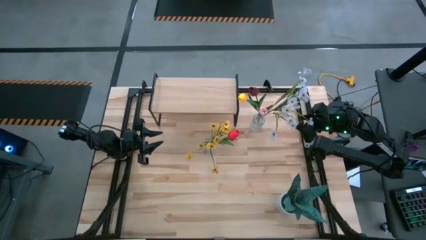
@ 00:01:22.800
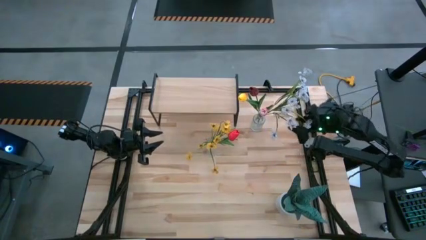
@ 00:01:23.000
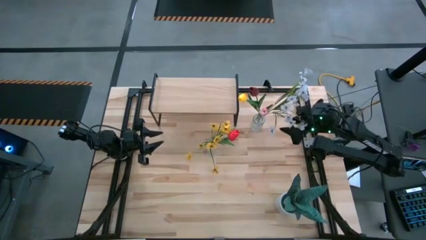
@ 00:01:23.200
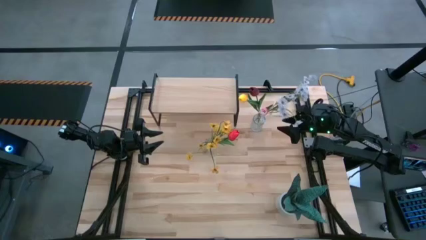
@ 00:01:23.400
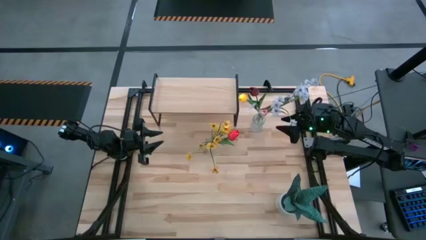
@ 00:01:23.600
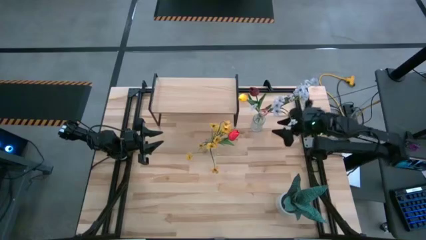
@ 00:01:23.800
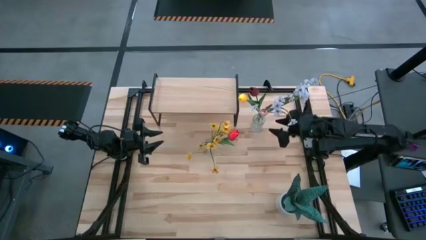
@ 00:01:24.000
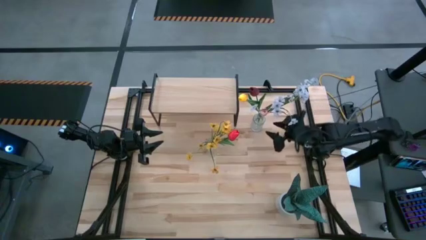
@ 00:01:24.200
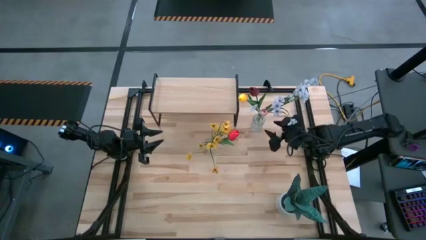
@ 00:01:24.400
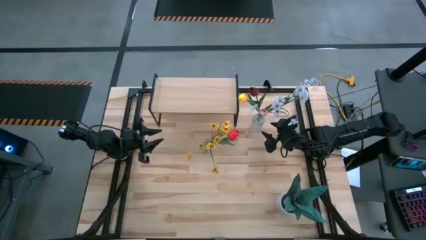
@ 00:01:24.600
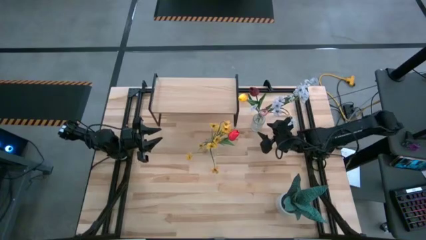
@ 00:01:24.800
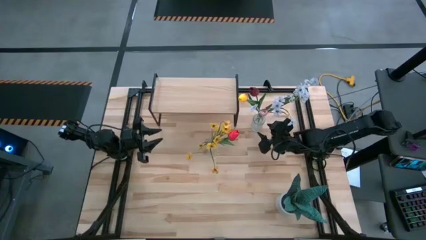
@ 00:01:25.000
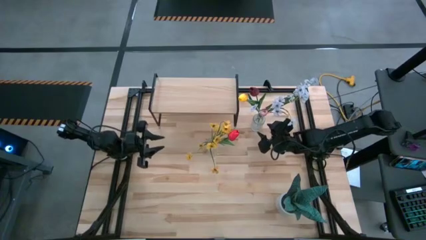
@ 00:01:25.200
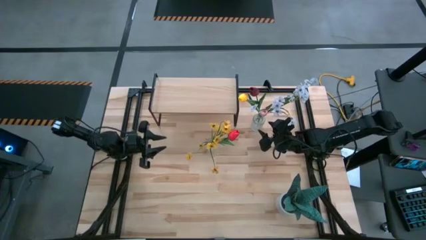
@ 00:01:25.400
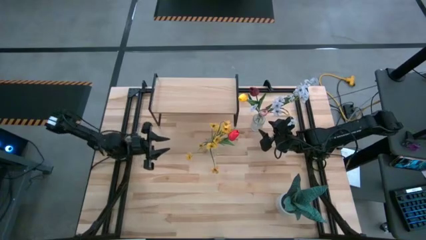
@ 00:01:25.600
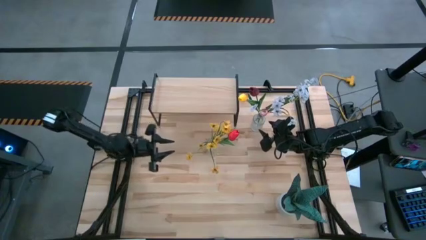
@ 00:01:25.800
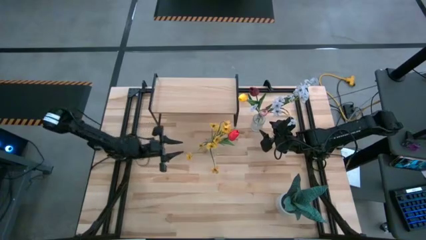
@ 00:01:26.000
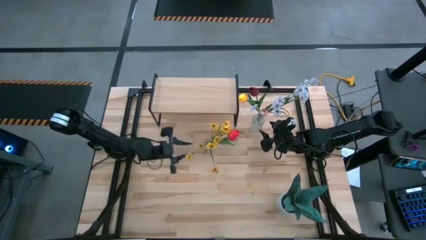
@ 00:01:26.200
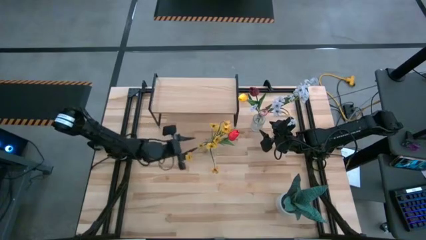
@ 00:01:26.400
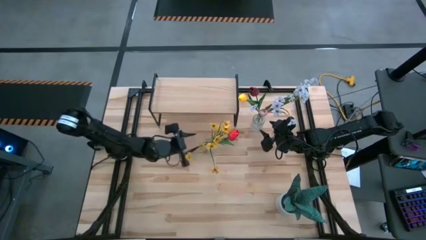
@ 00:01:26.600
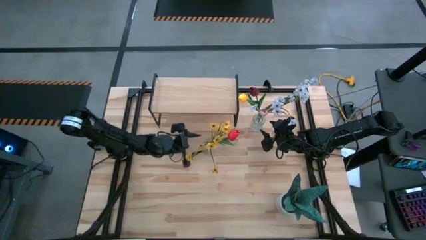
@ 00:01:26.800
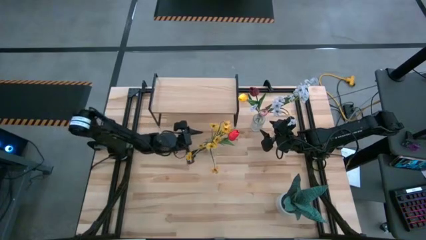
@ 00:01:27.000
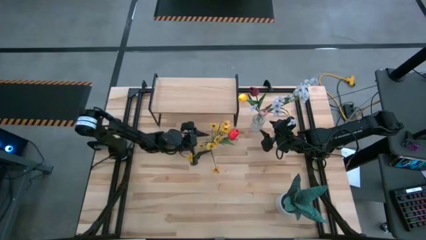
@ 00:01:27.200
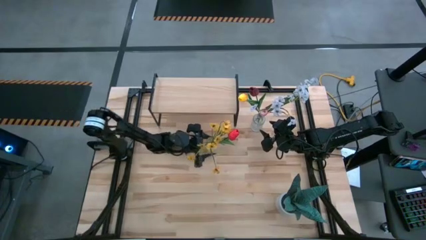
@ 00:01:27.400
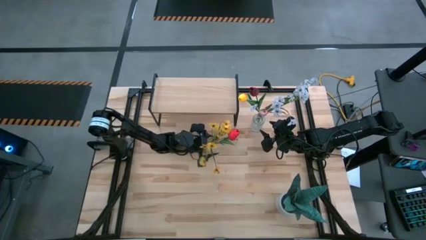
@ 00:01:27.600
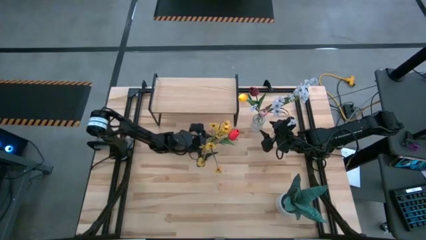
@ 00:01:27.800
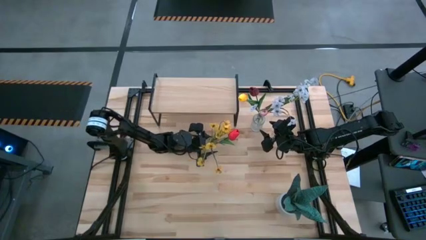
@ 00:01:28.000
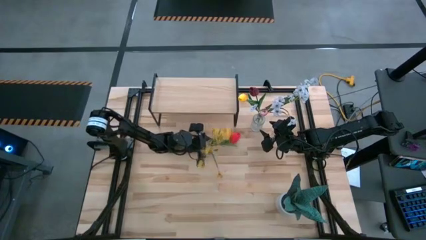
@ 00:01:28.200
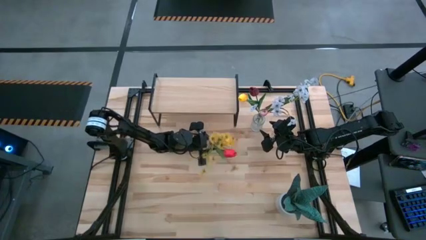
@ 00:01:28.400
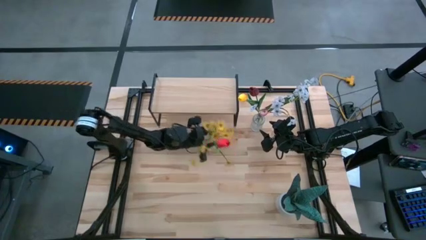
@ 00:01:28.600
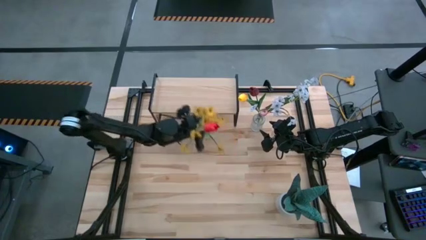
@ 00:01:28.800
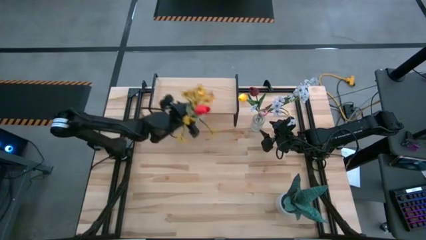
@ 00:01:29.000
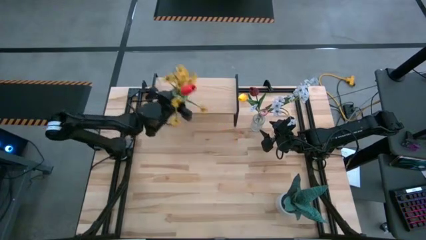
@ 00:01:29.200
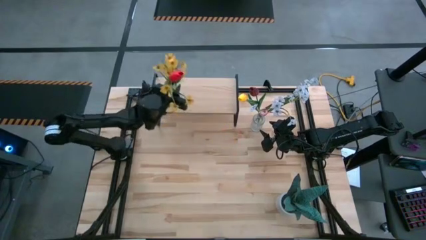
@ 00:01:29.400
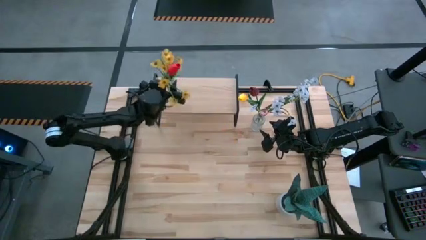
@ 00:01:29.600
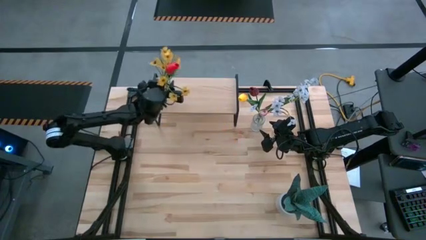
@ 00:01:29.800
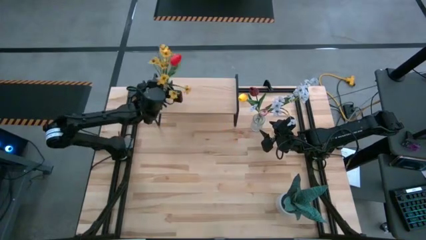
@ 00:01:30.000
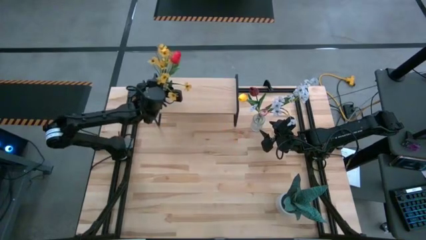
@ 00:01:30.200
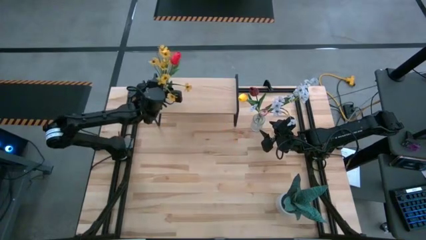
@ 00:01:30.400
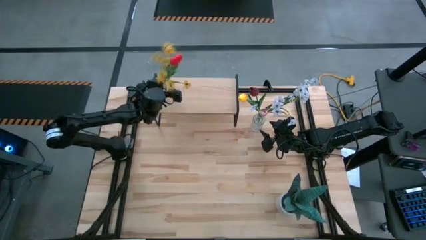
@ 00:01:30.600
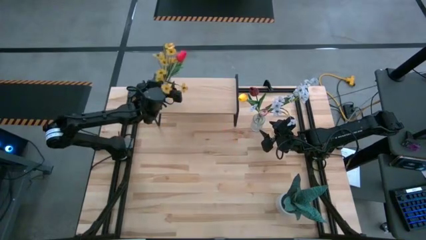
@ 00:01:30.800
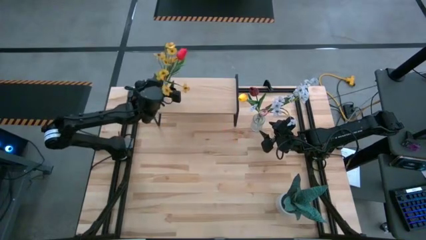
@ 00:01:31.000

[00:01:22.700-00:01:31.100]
Task: Pick and place flowers into a vace then onto a shelf
Put the bottom flower vase on the shelf

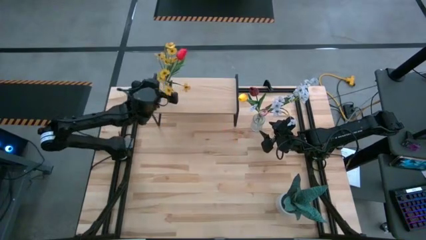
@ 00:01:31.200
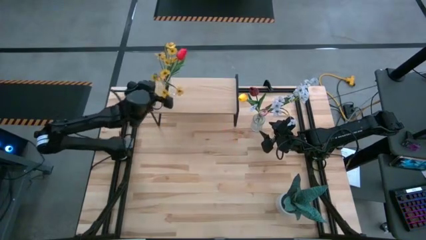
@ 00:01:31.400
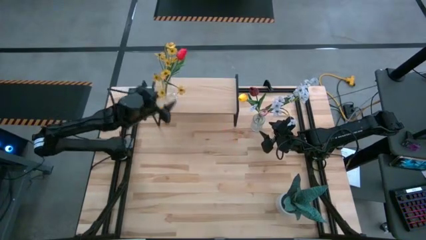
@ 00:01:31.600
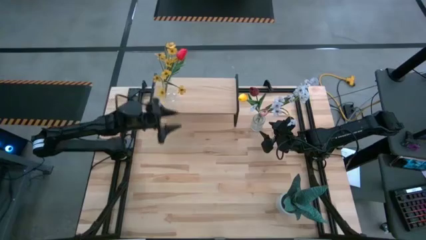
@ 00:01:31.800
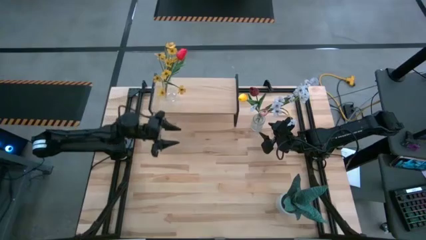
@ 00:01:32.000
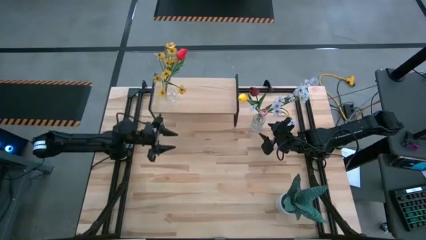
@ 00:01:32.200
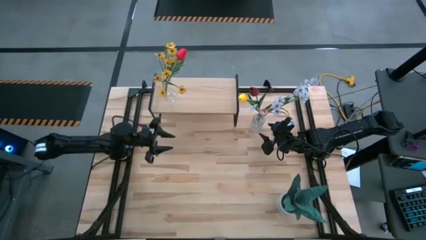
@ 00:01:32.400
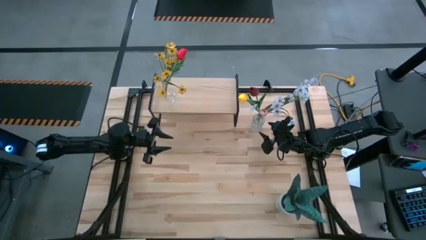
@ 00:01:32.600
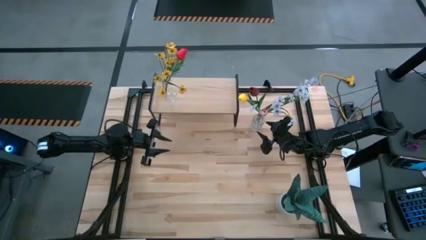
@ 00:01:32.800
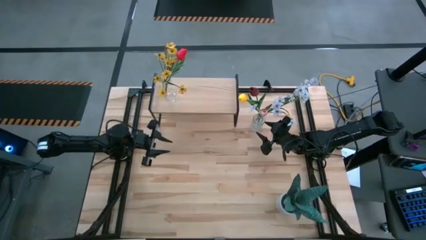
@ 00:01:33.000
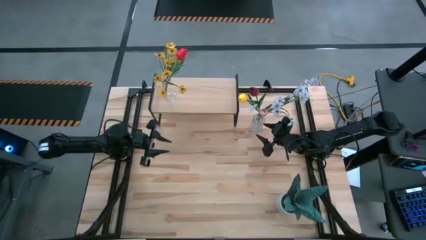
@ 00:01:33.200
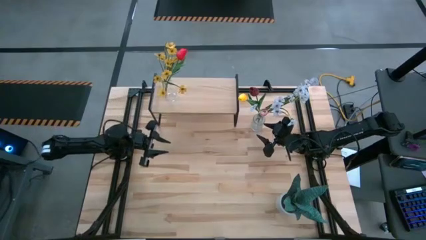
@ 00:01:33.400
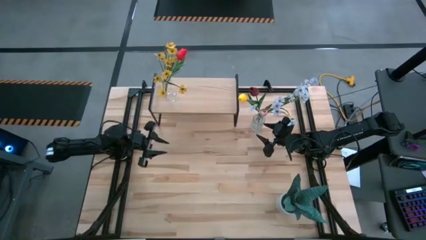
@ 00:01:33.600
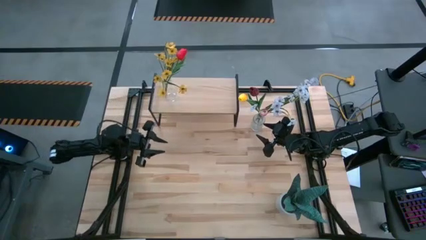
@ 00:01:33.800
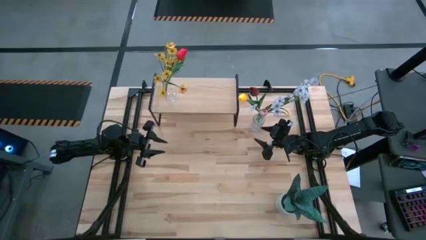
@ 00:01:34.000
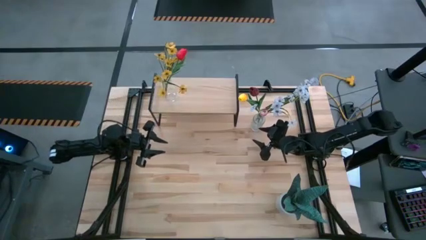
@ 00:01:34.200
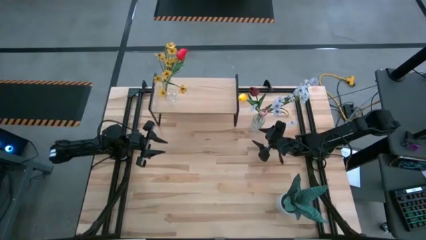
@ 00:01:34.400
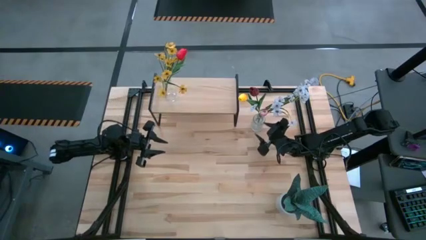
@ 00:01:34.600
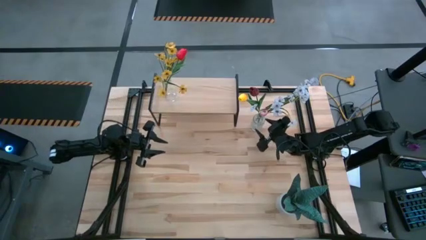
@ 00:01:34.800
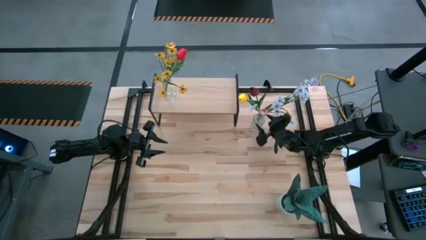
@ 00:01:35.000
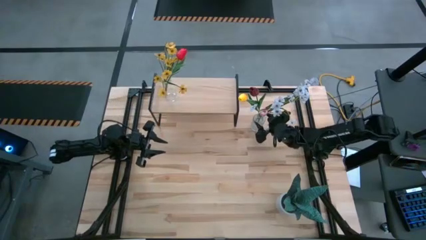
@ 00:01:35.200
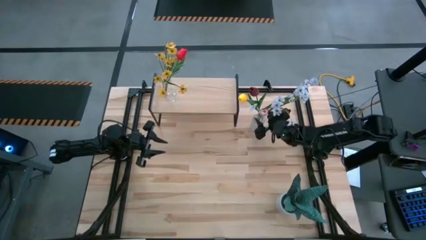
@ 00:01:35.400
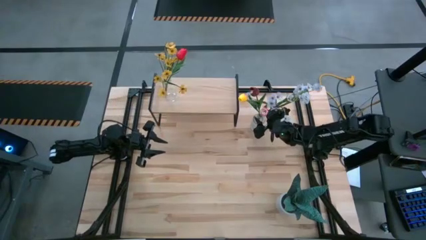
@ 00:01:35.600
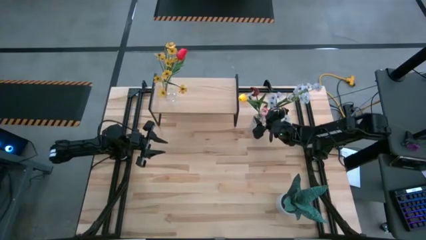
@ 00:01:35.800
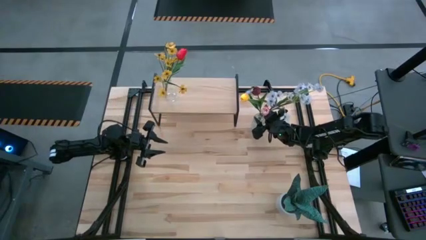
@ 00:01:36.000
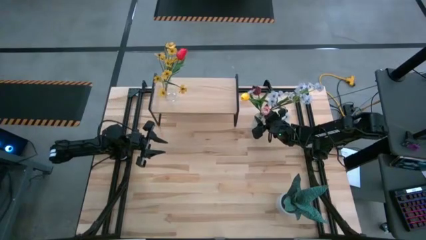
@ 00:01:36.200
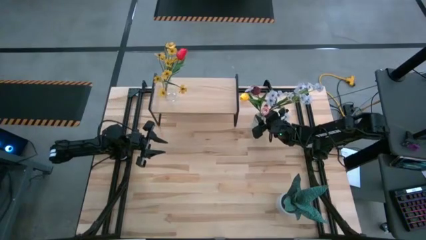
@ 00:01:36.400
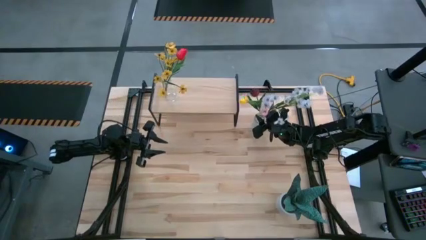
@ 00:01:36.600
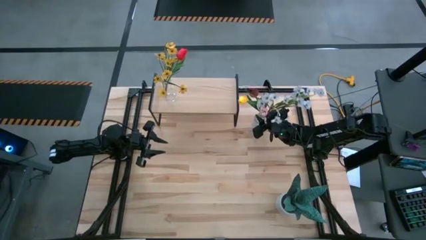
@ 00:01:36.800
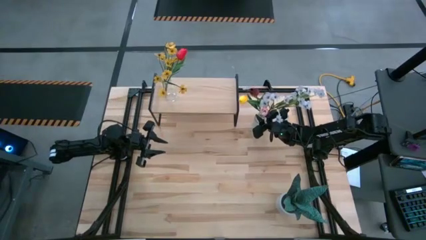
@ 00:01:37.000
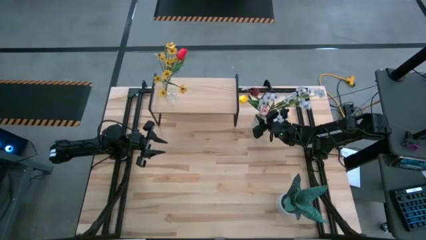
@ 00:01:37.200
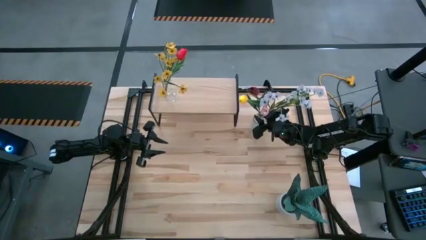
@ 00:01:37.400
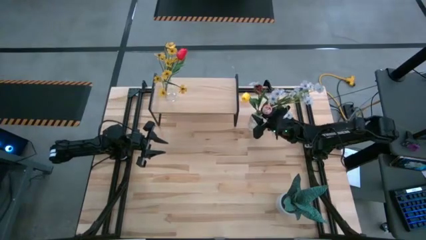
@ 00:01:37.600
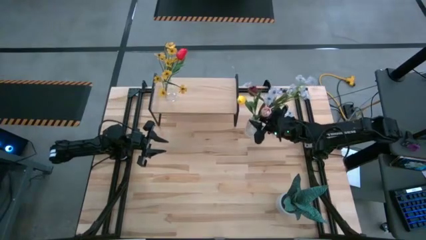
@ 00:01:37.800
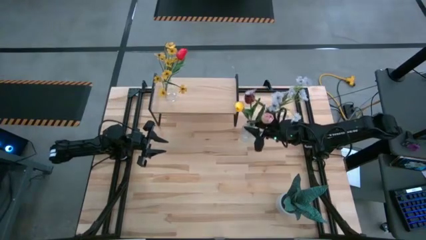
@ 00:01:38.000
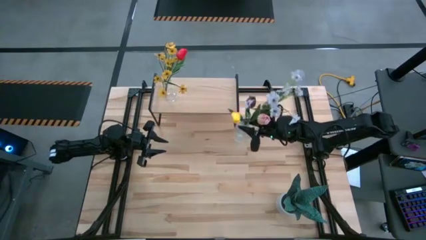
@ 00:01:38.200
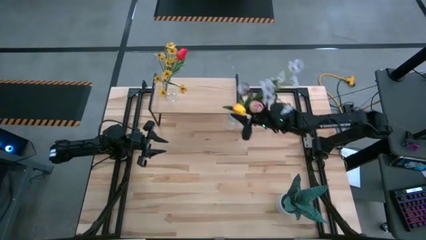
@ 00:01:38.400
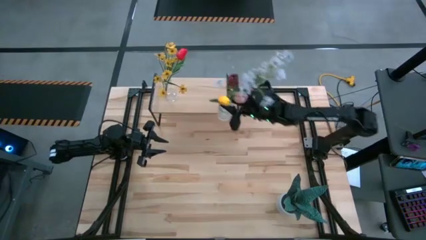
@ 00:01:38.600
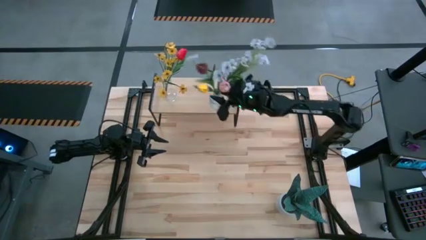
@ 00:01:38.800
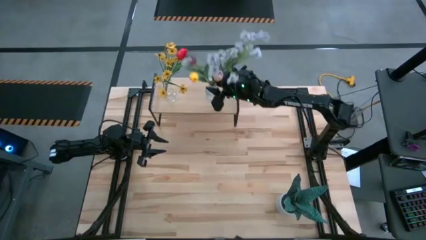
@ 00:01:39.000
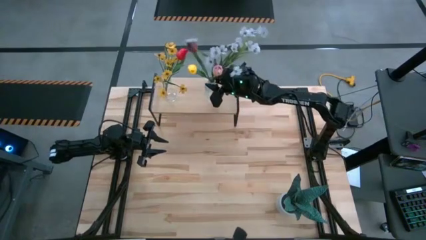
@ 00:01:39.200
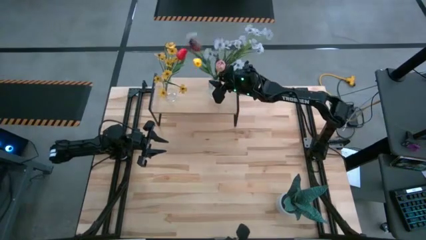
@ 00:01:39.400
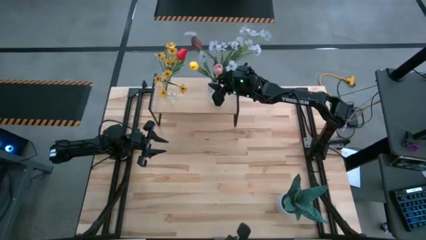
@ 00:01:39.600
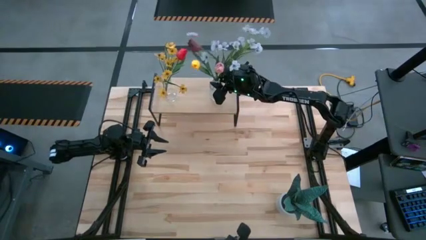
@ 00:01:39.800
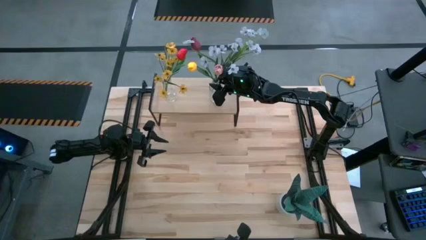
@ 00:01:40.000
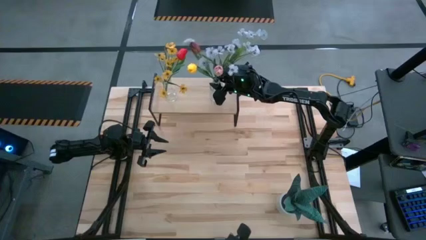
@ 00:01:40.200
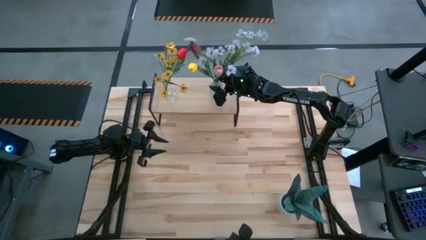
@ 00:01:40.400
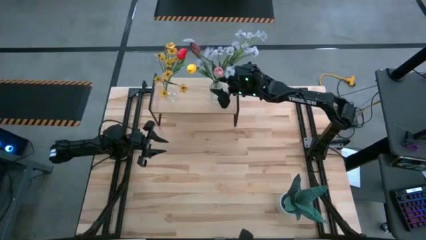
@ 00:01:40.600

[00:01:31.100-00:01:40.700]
Put the flower vase on the shelf
